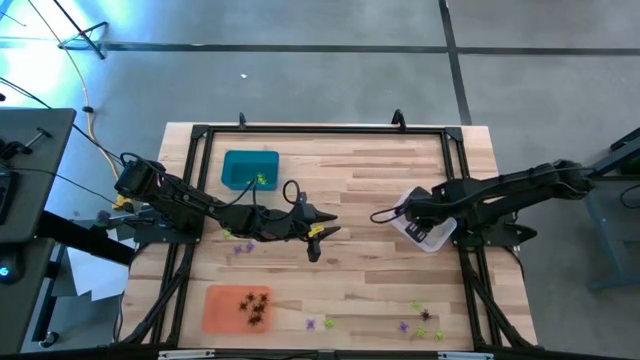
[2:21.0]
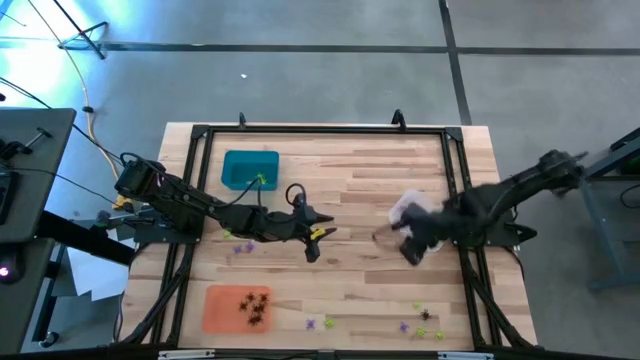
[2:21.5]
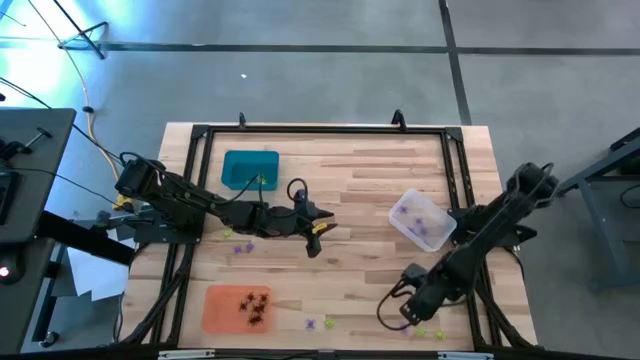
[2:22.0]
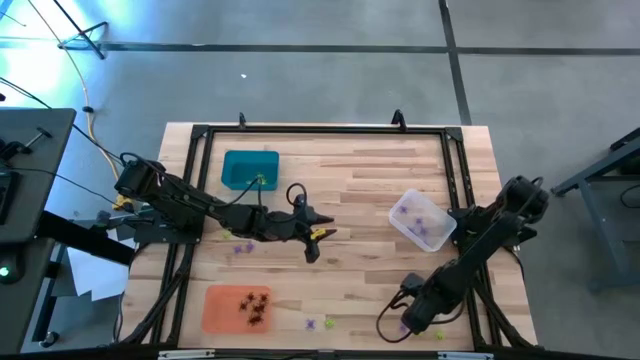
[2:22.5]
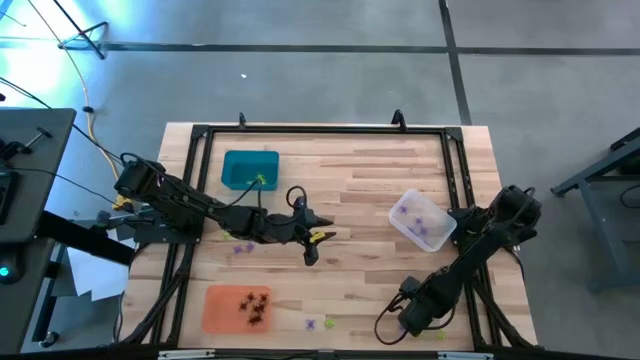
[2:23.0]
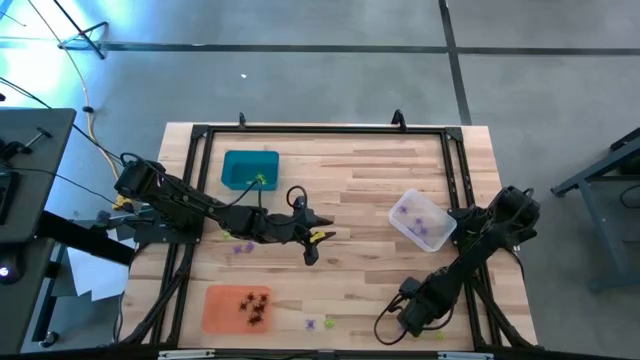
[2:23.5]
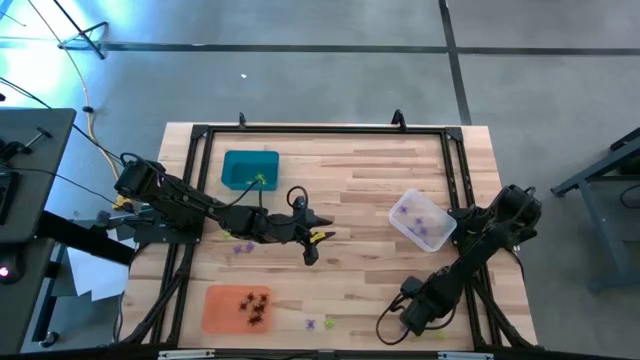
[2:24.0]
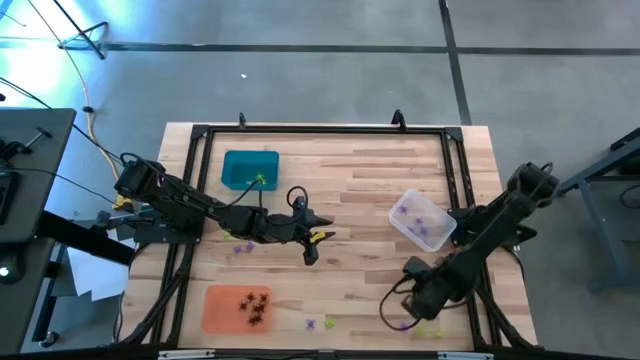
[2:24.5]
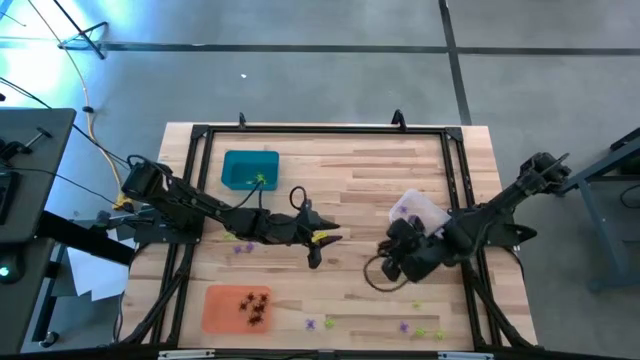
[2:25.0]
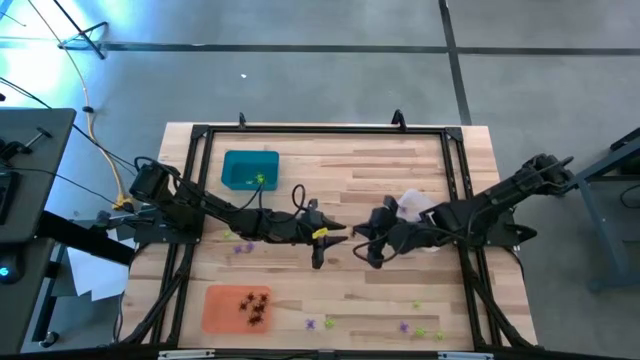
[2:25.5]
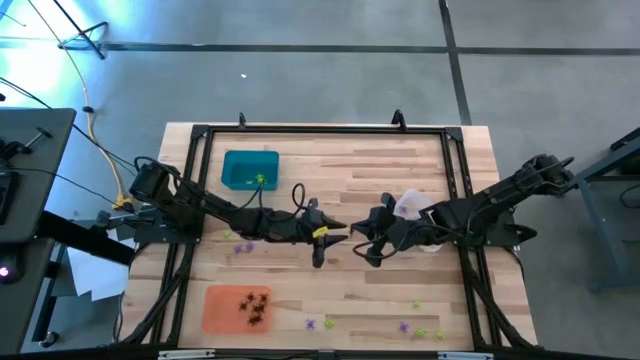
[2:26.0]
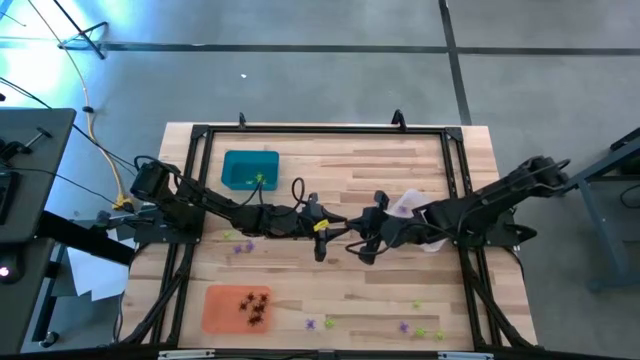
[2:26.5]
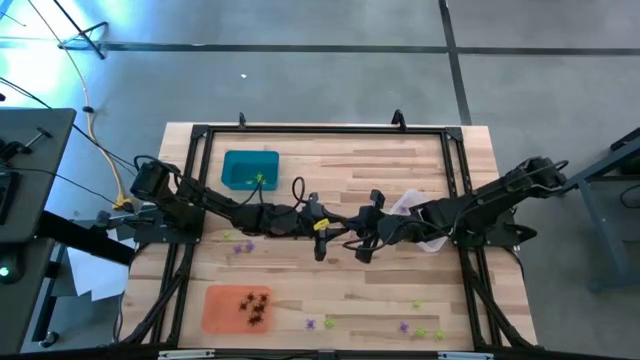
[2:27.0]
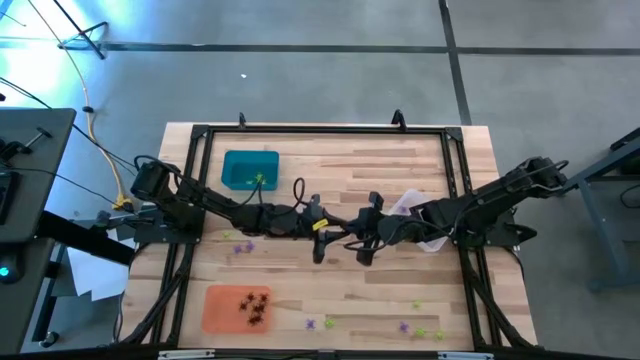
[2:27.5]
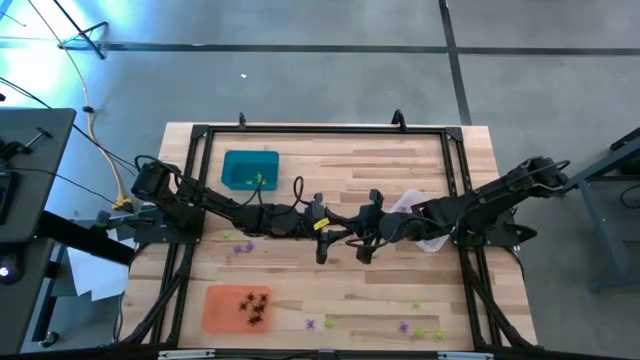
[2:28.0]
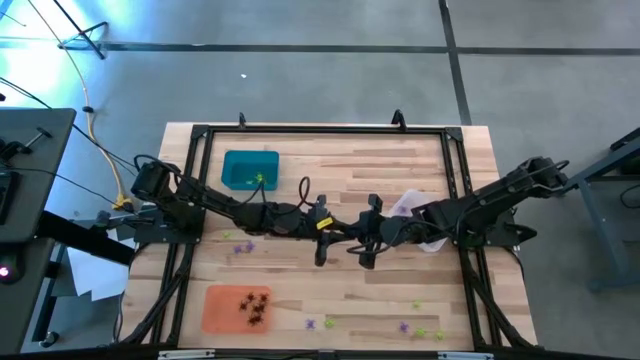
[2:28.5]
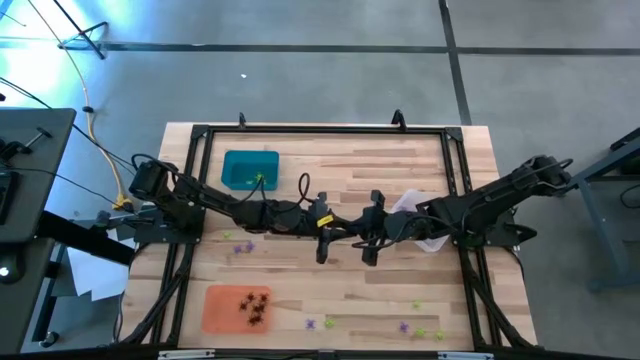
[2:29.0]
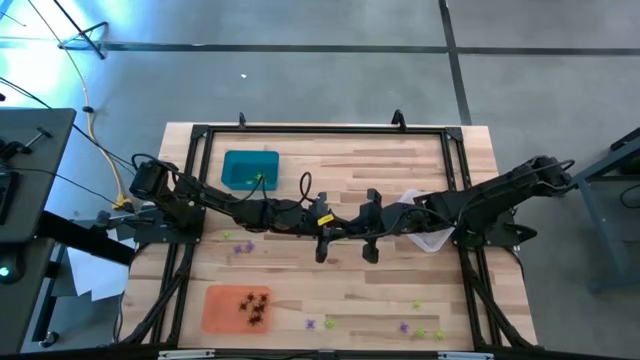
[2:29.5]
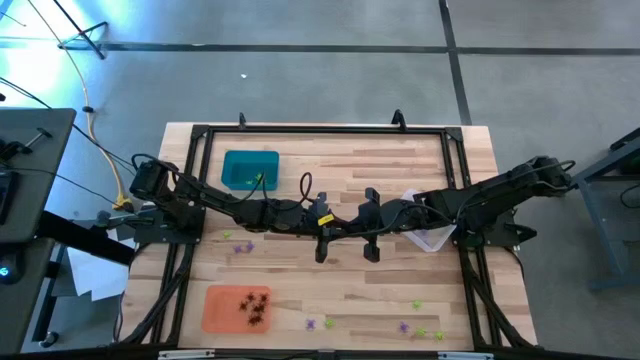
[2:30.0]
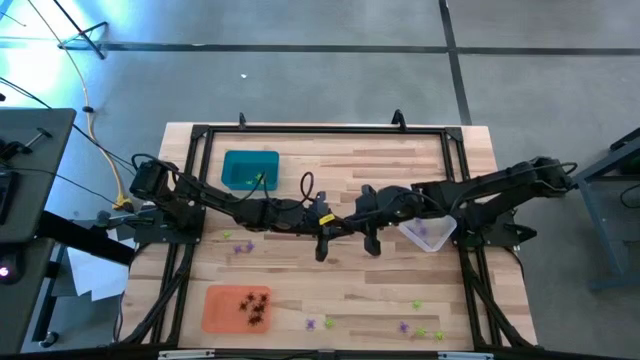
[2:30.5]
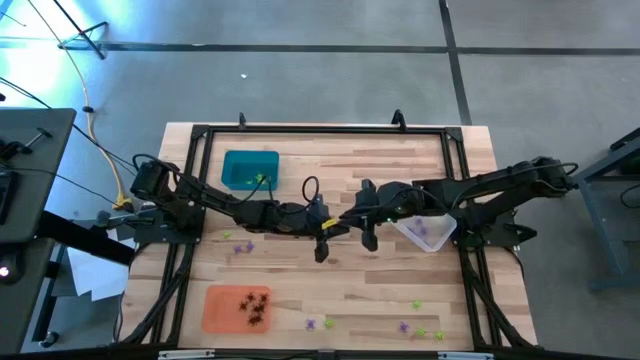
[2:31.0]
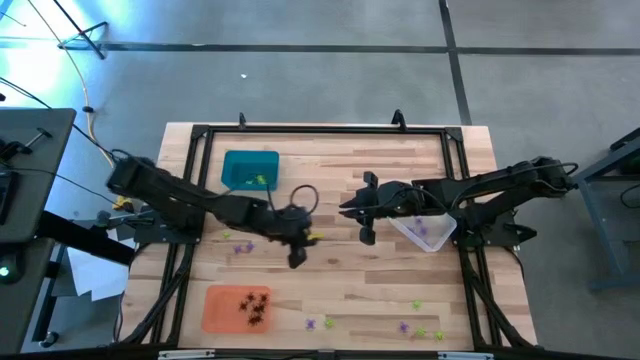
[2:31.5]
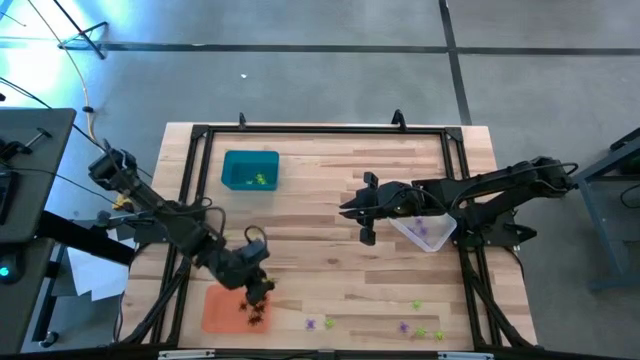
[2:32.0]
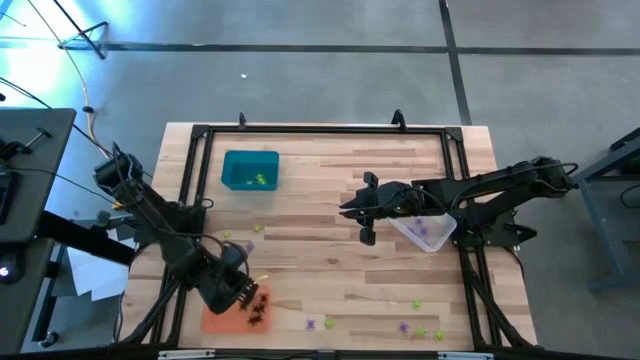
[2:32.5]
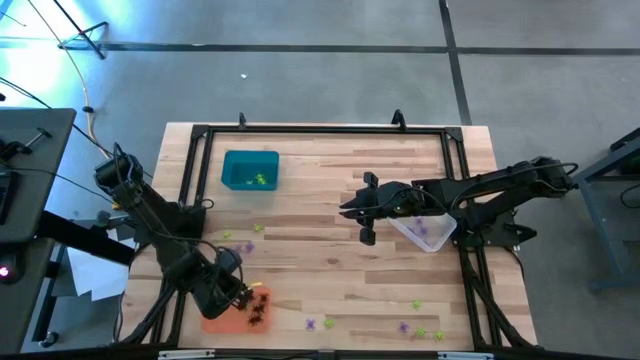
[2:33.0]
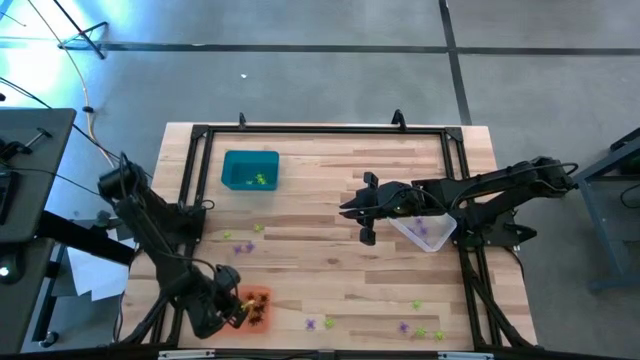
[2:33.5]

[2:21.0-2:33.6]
Task: Sort Halloween decoration
Put the black spider toy into the orange bin

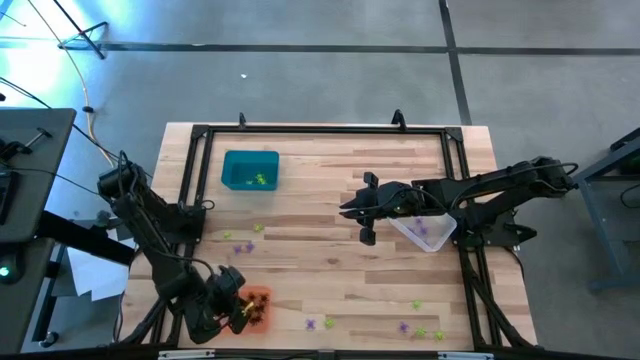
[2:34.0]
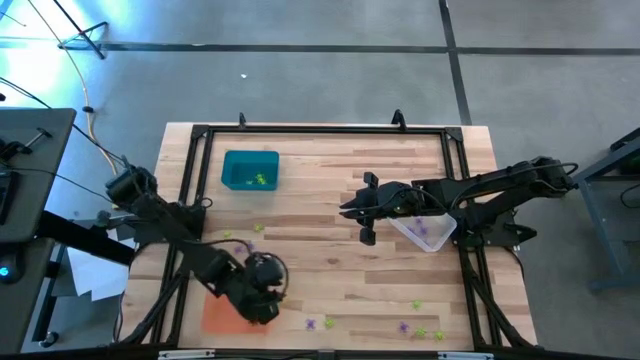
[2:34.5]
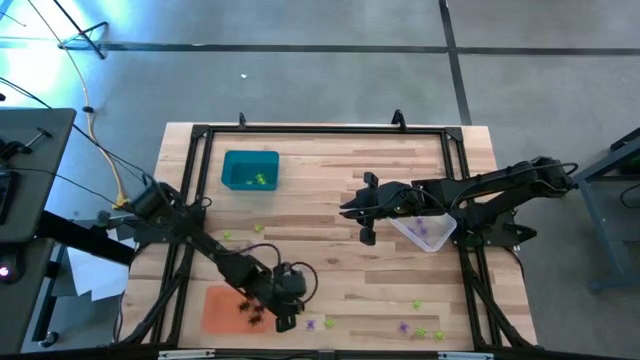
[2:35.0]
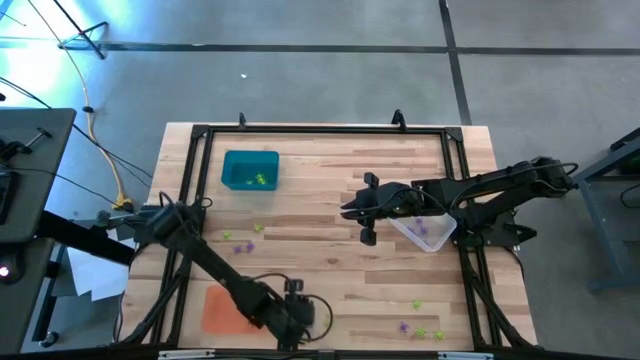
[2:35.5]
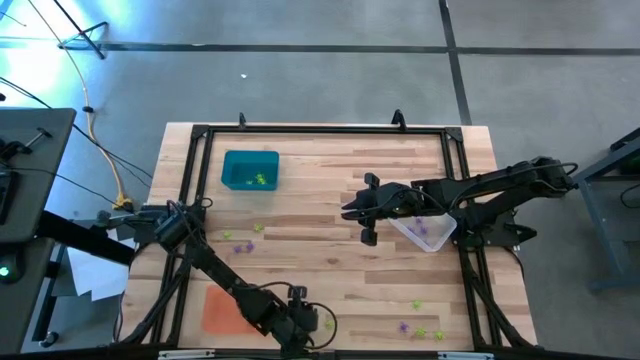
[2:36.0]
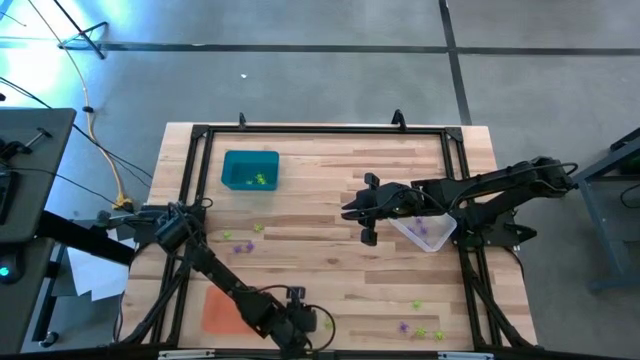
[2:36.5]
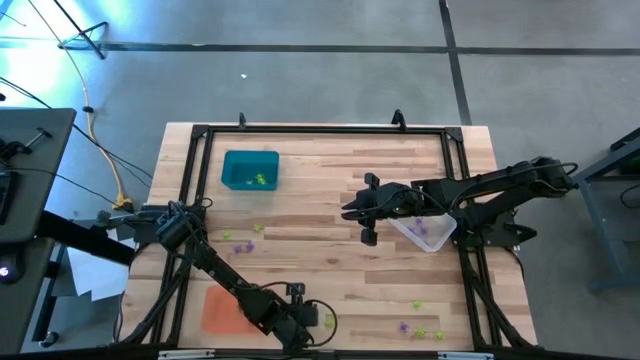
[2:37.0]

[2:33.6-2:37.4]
Put the violet spider toy into the transparent bin

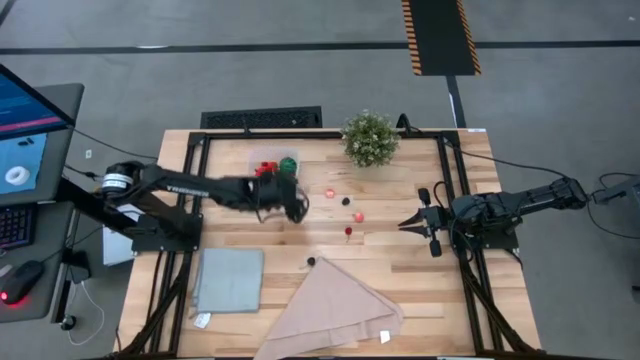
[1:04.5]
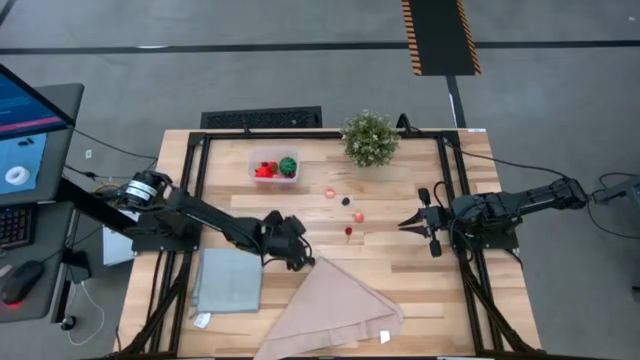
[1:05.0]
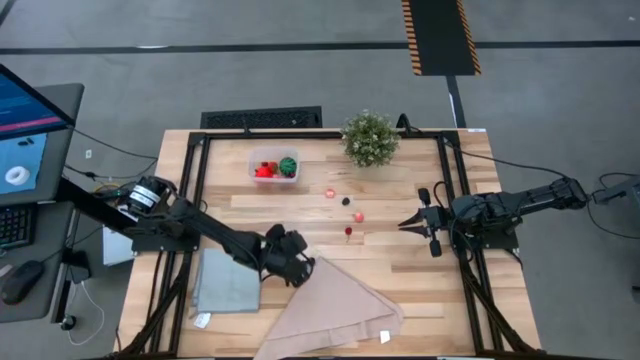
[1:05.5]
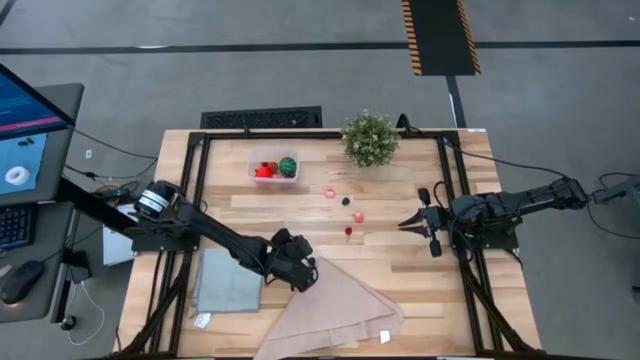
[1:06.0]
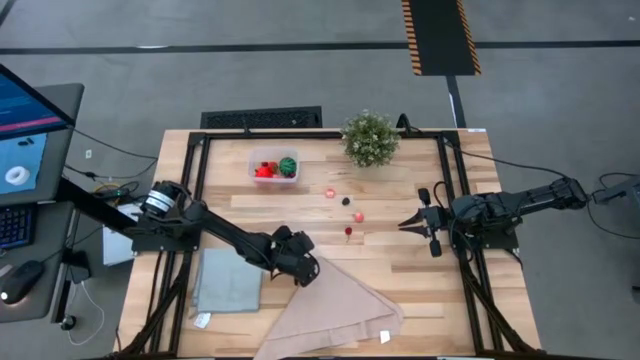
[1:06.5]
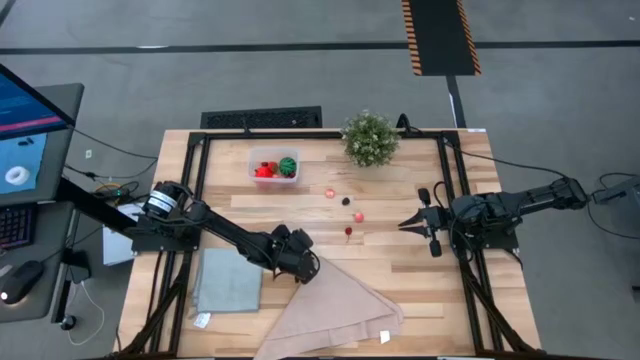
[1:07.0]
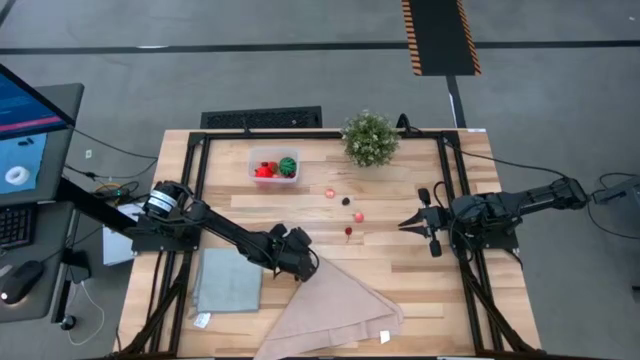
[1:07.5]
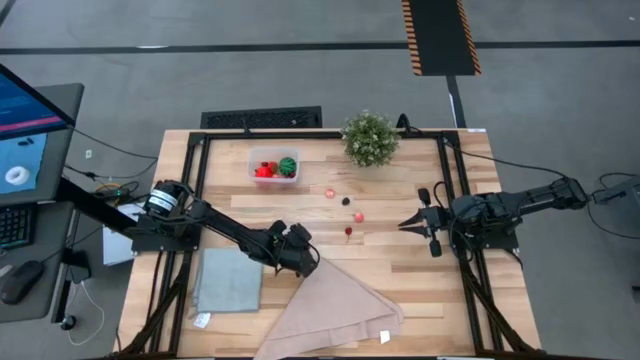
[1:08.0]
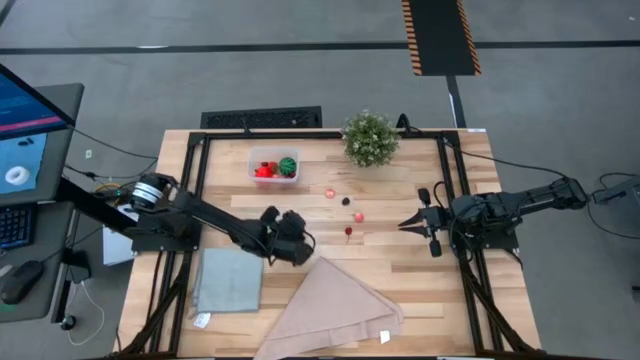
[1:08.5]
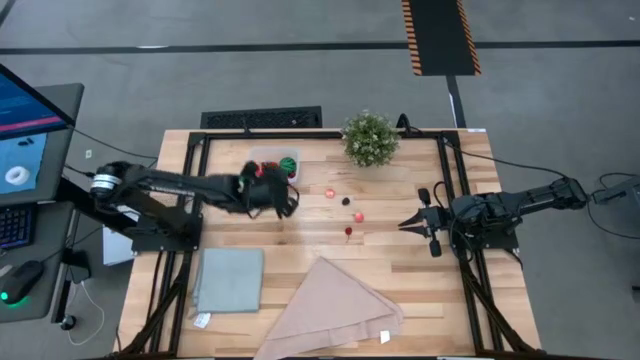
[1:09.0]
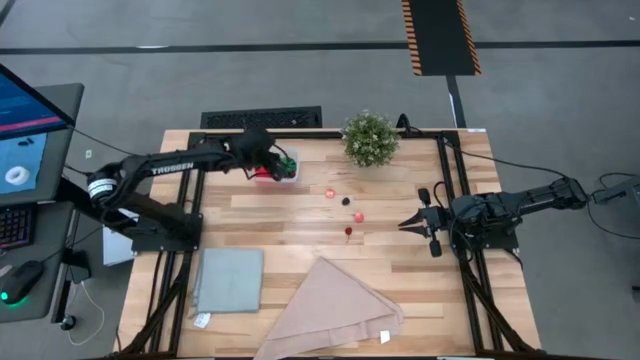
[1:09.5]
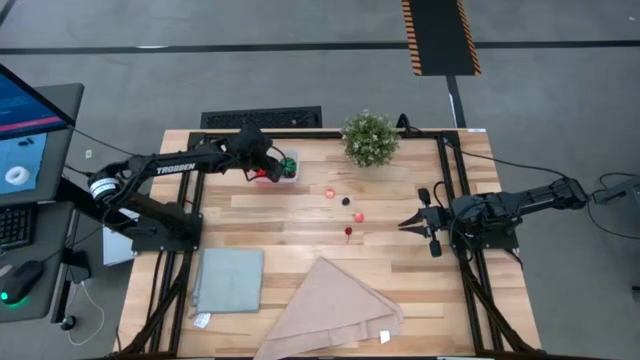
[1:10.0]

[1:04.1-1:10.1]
Task: Pick and placing Produce into tupperware
Put the black cherry into the transparent container
